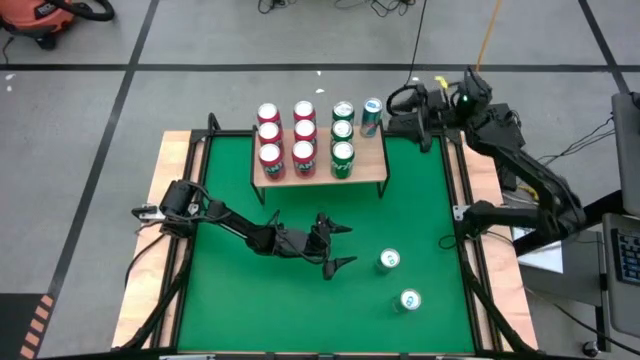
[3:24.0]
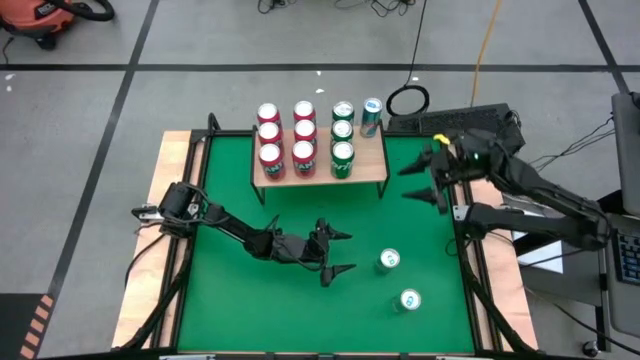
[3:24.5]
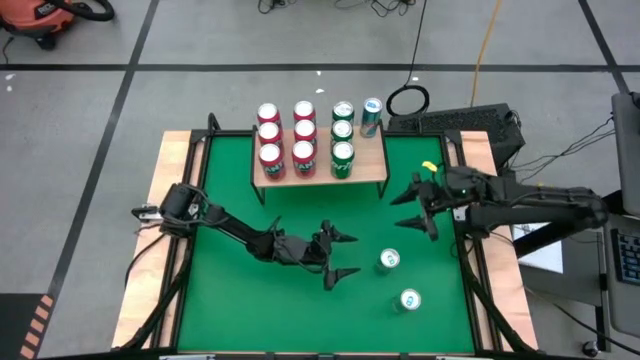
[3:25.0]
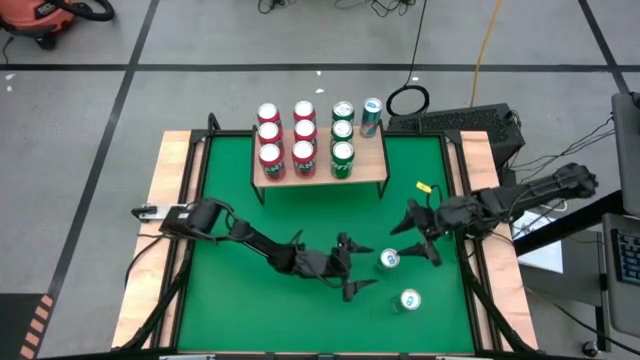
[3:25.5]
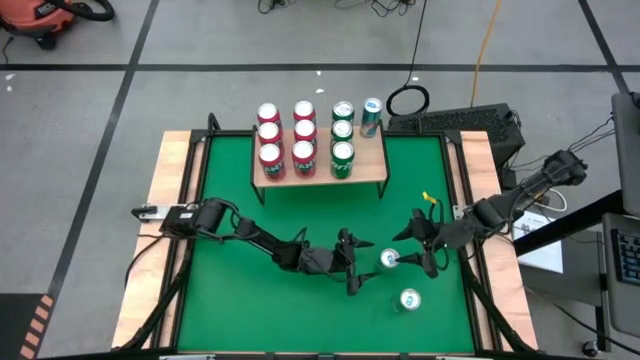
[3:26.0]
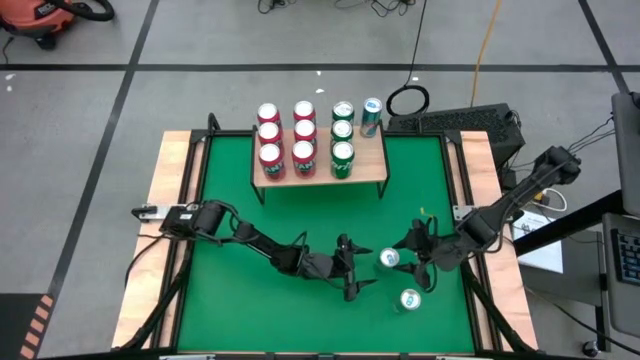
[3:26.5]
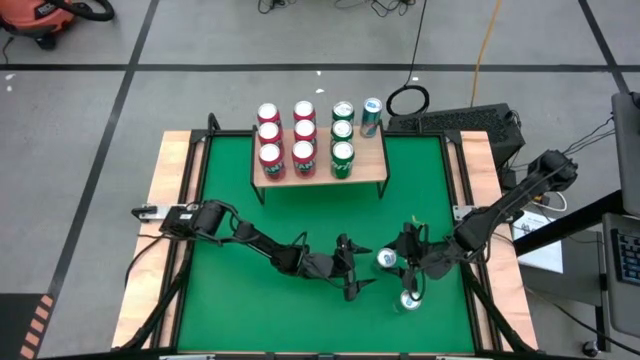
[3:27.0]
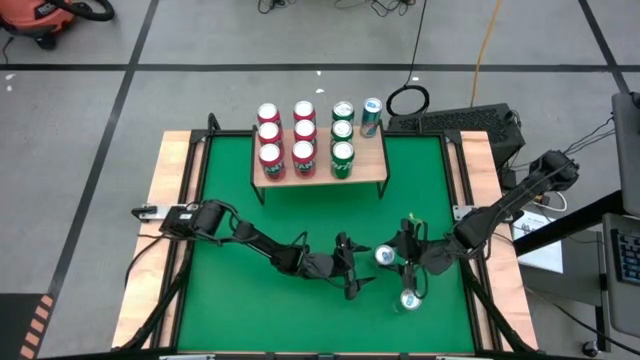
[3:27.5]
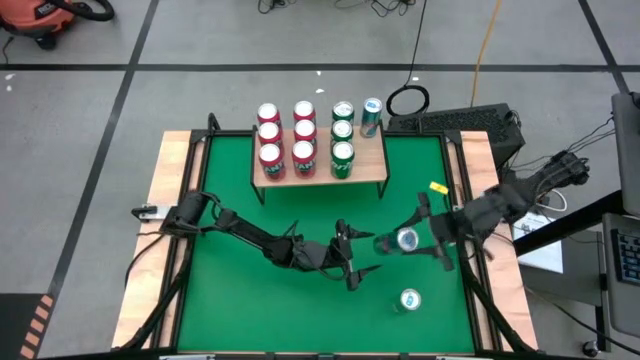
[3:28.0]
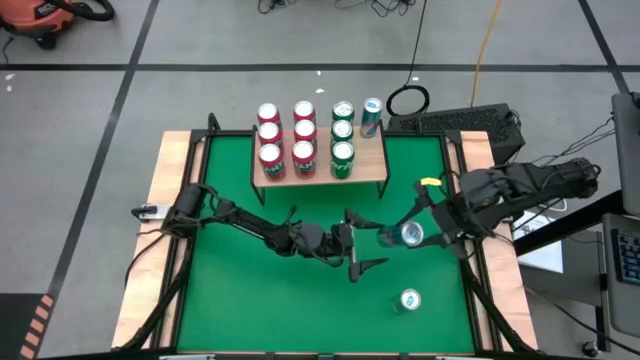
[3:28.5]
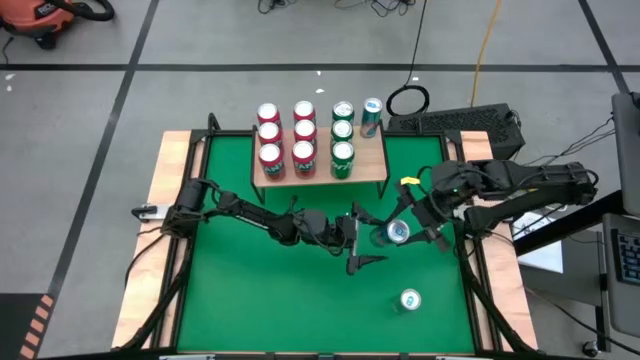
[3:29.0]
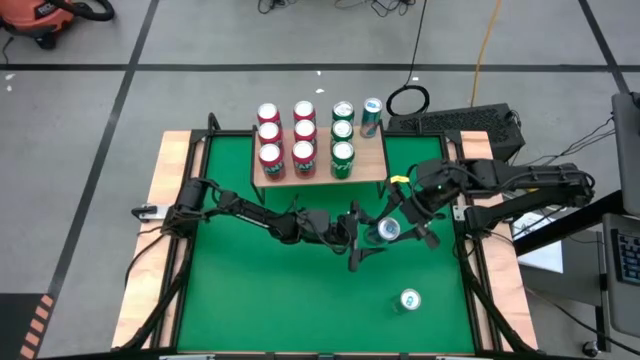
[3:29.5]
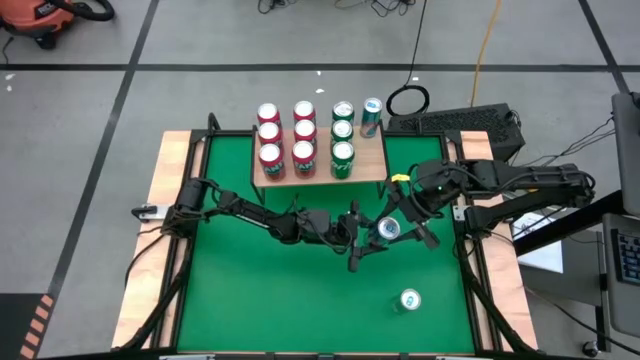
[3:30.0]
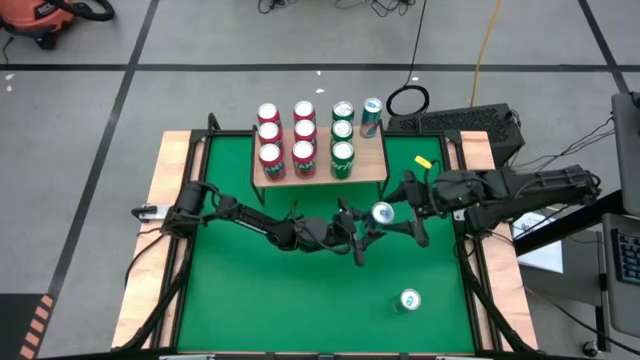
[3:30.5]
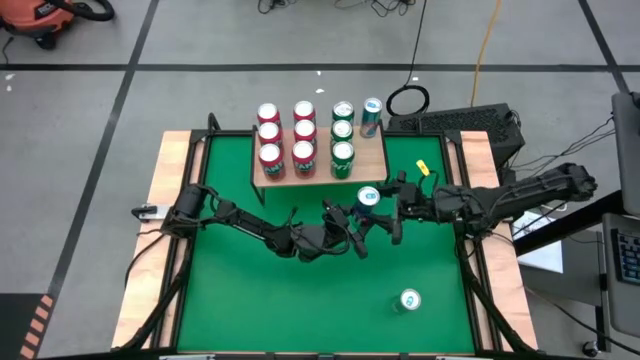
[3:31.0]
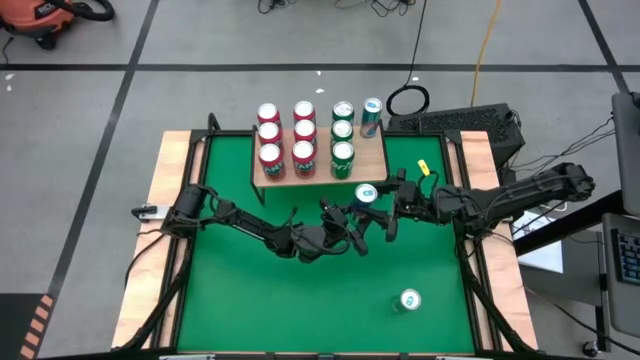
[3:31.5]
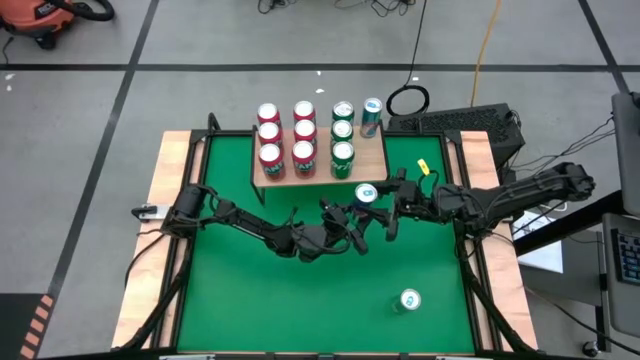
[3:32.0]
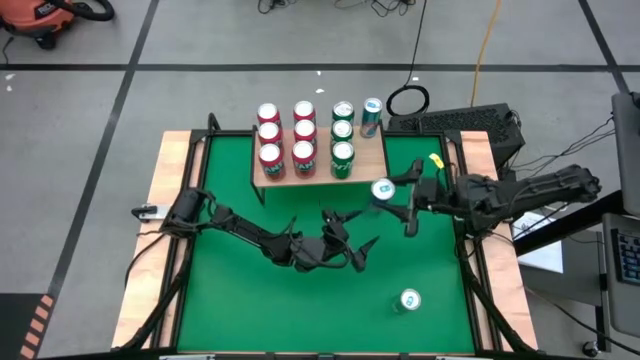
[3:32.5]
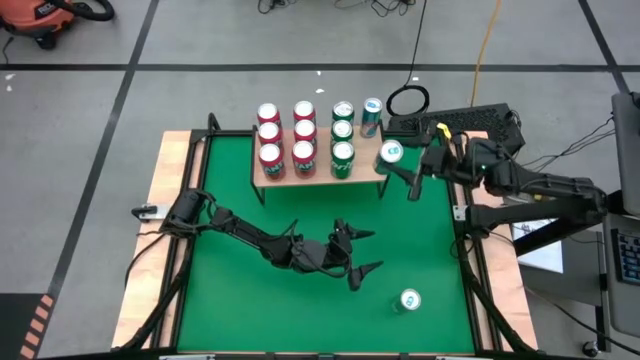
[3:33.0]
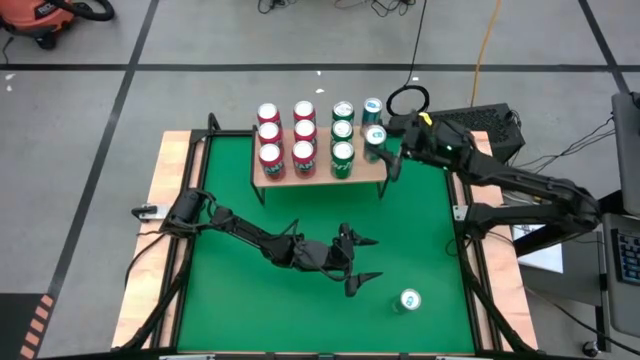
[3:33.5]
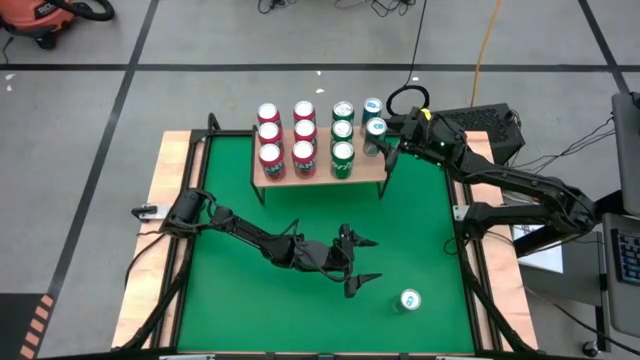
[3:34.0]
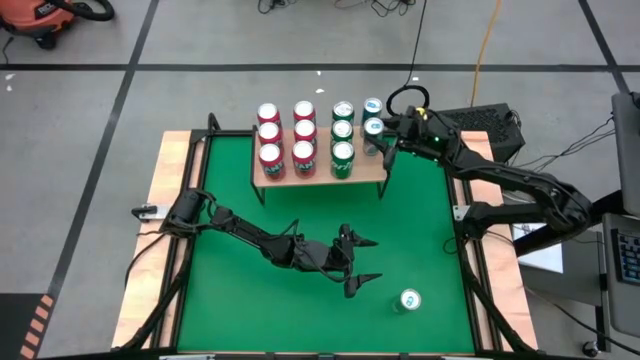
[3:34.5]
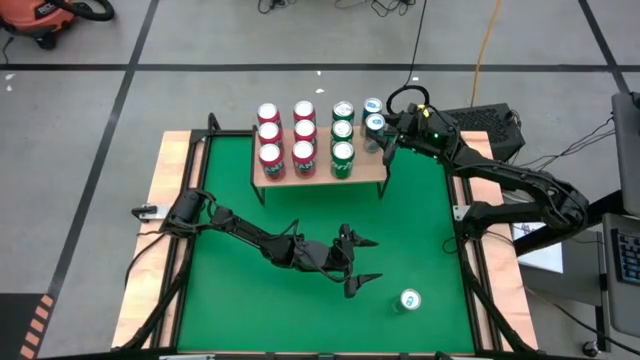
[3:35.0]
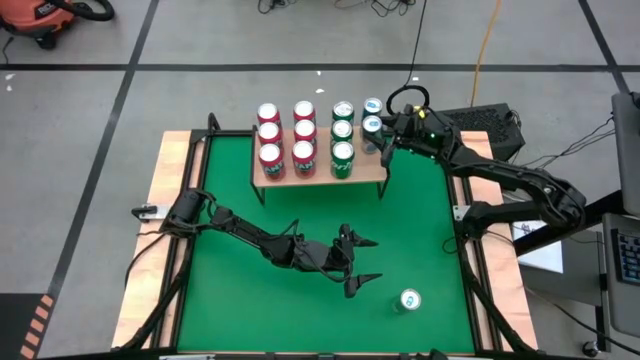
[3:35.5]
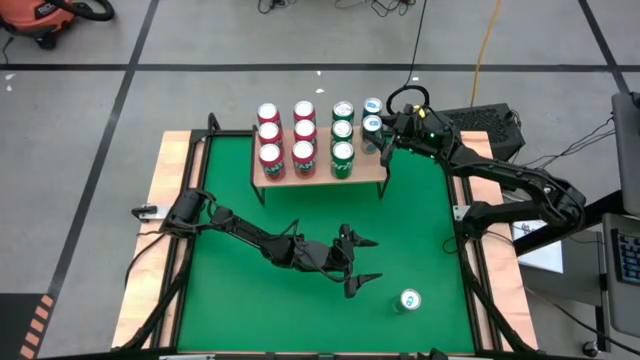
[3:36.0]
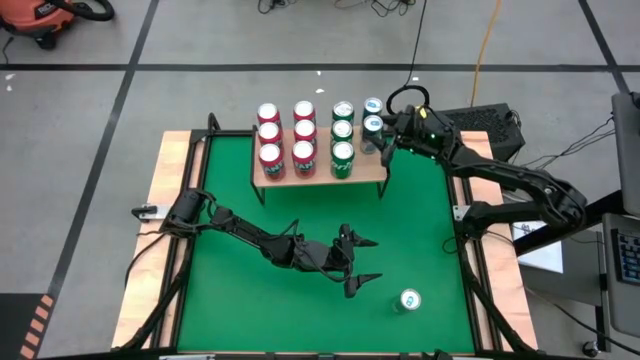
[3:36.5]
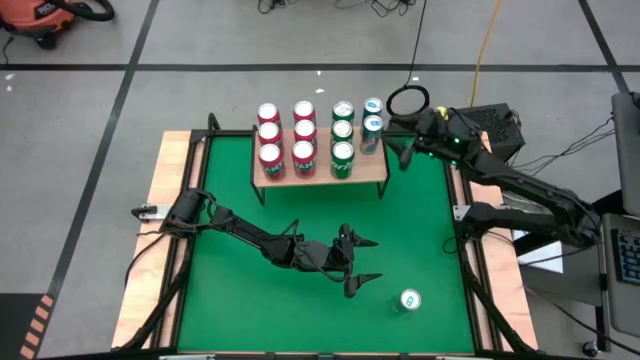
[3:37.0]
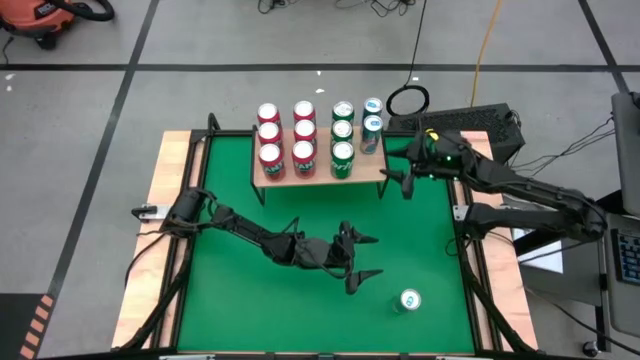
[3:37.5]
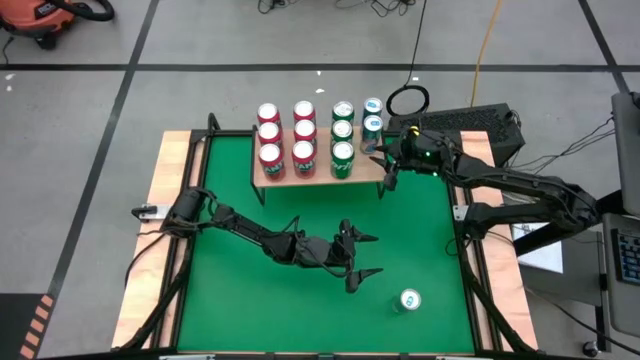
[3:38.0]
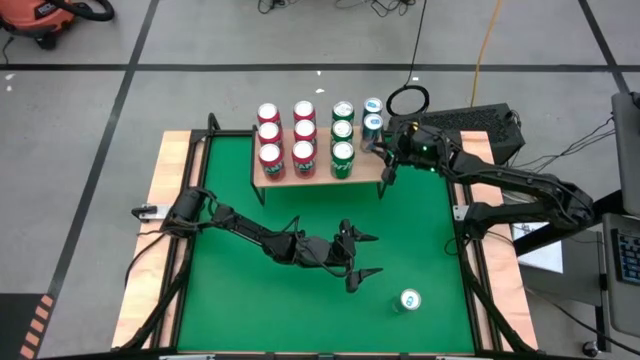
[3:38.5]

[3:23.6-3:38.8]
Task: Place canned beverage on shelf
Put the blue soda can on the shelf aligned with the other blue soda can

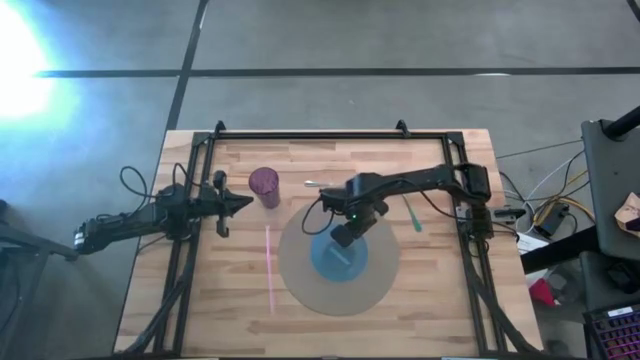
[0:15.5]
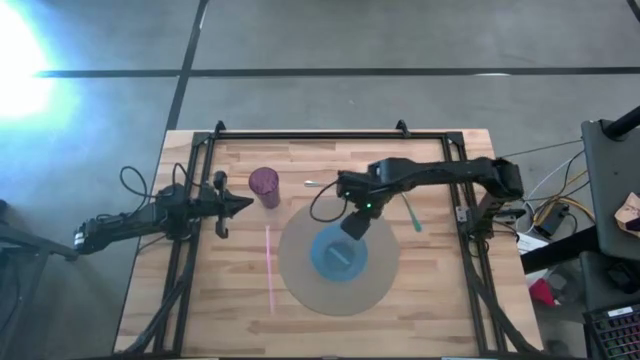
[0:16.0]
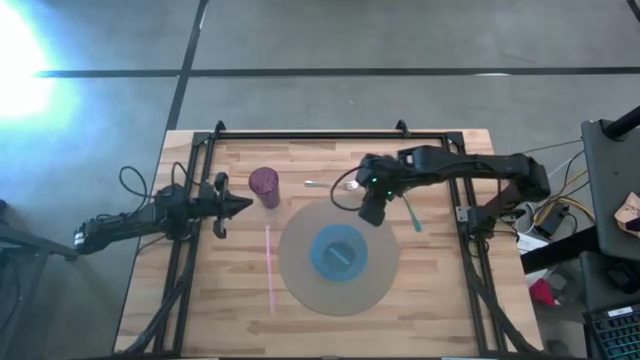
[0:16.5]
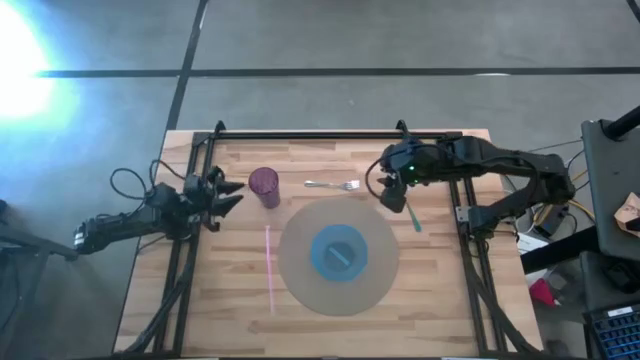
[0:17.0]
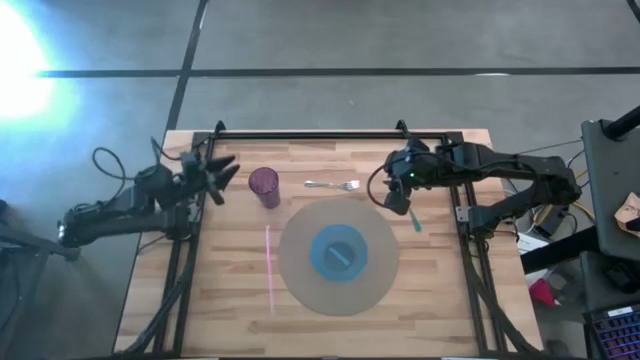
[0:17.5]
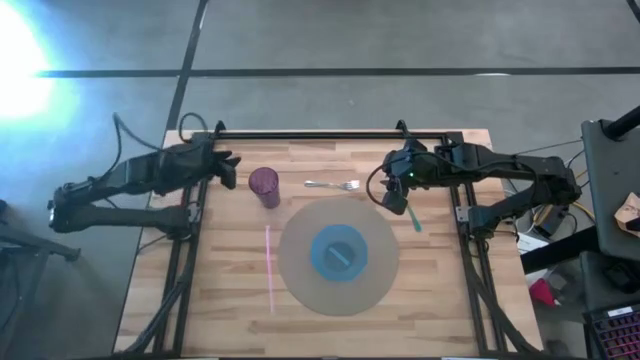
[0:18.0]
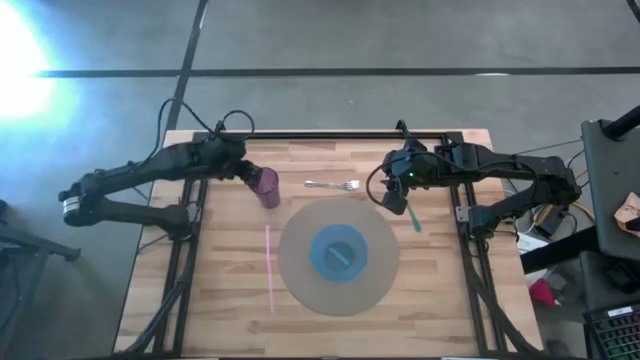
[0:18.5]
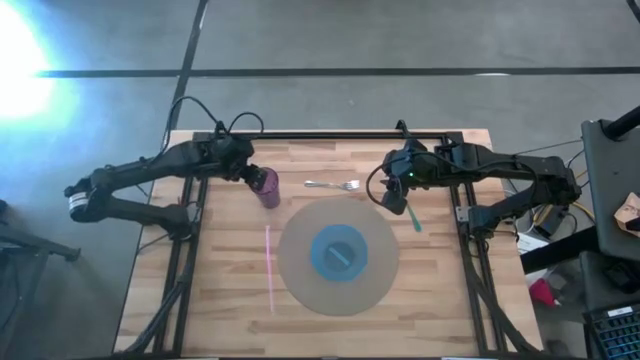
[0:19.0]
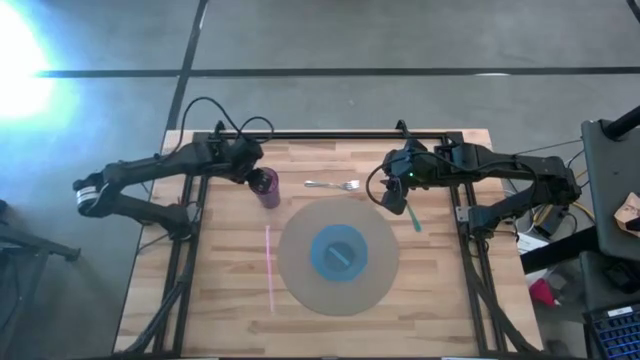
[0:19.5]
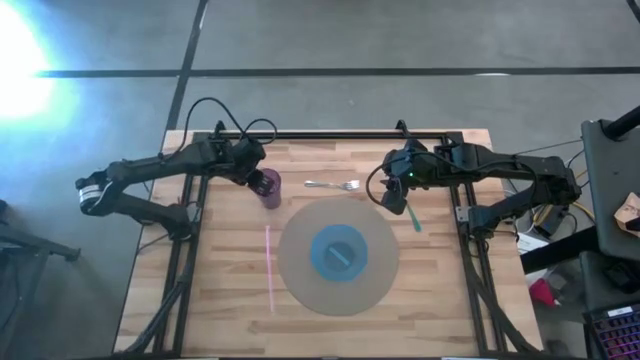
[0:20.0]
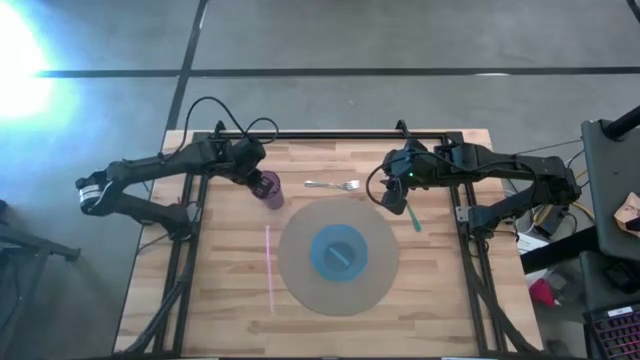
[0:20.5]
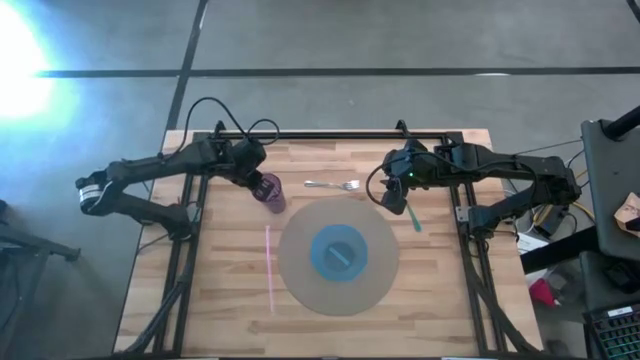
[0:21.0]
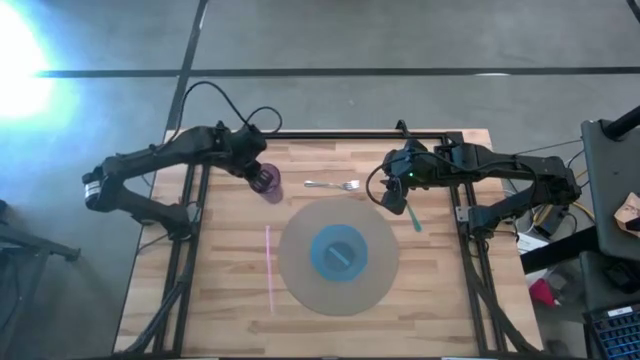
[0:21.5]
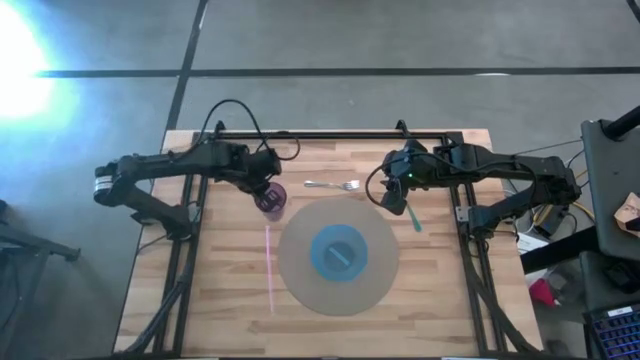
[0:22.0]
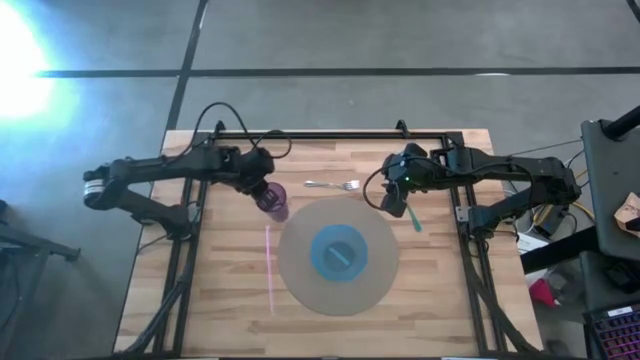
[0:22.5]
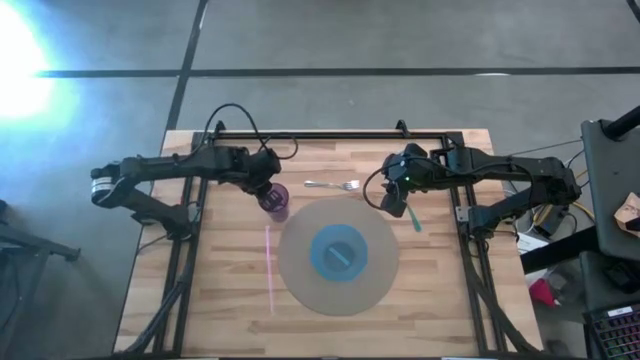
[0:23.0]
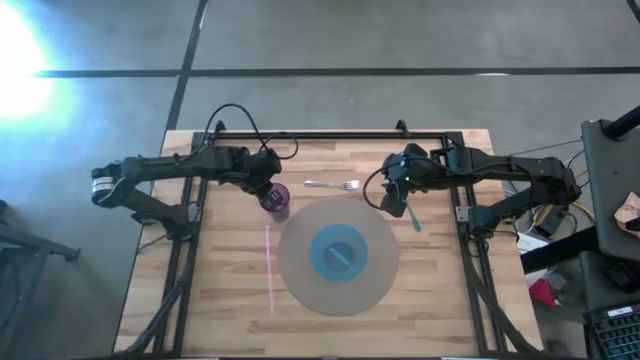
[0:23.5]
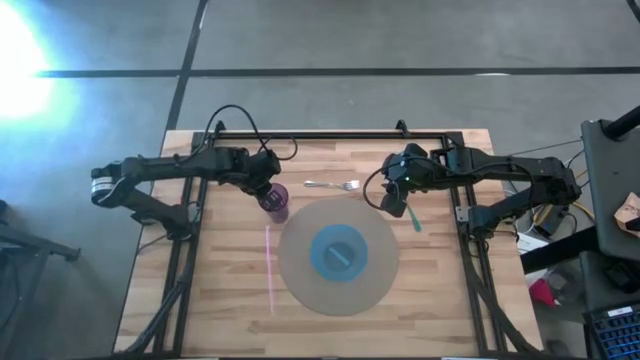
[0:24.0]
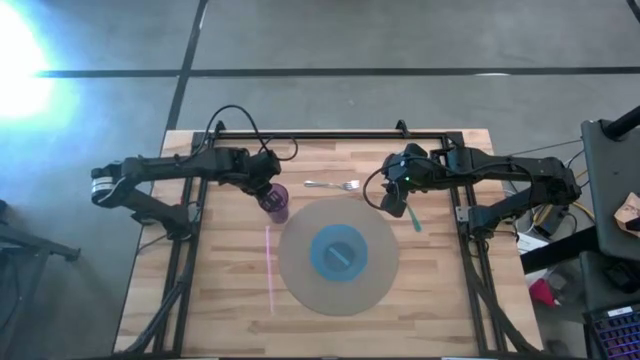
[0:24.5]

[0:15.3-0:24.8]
Task: Pick & Place Utensil
Put the violet cup in the top left of the brown mat
